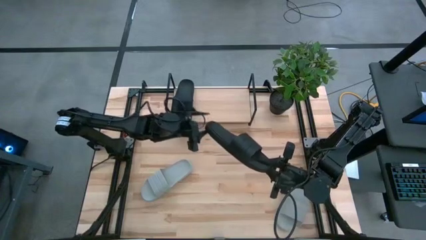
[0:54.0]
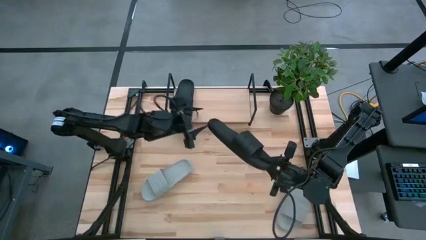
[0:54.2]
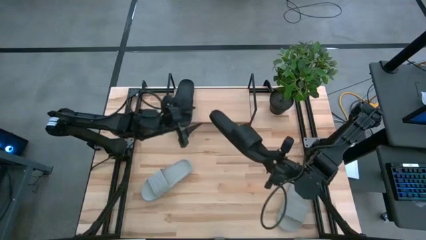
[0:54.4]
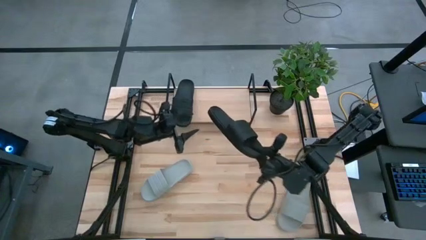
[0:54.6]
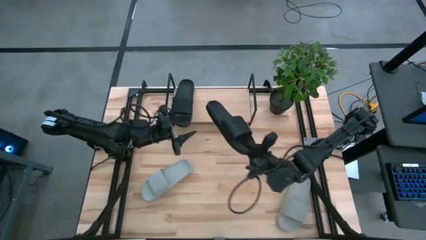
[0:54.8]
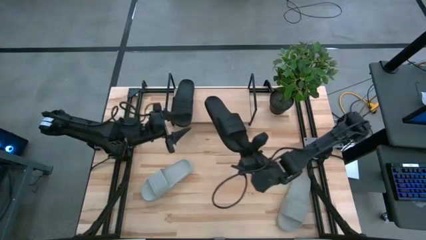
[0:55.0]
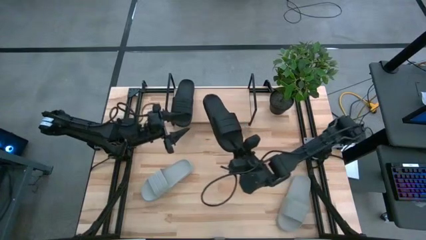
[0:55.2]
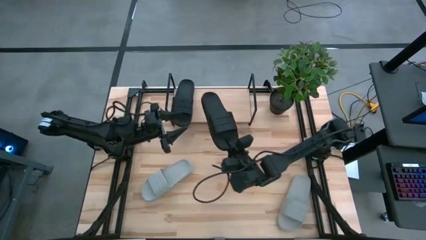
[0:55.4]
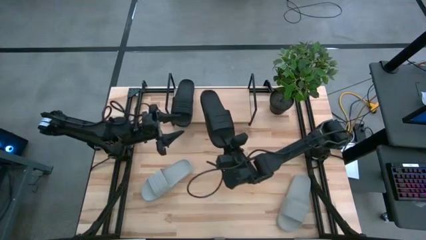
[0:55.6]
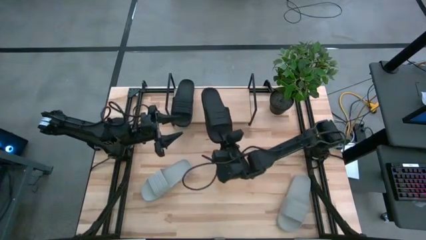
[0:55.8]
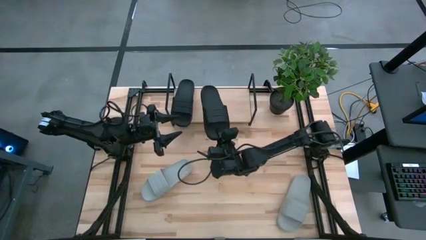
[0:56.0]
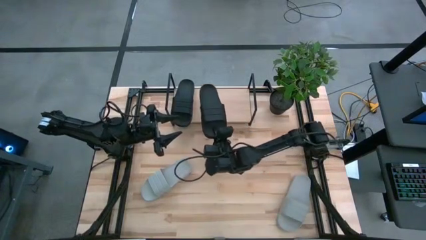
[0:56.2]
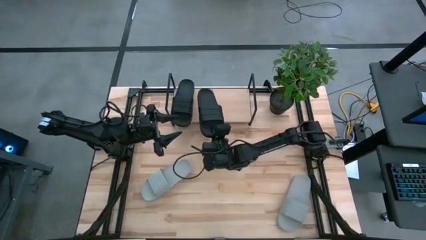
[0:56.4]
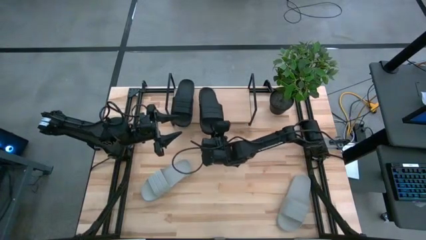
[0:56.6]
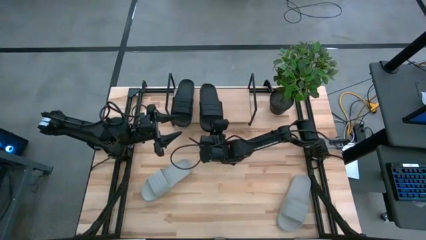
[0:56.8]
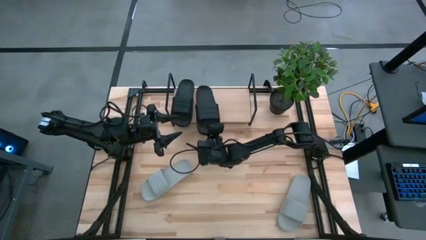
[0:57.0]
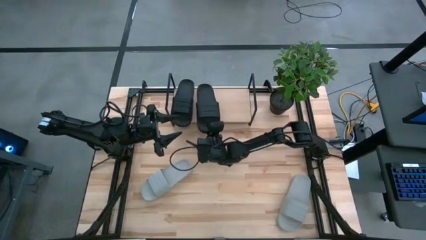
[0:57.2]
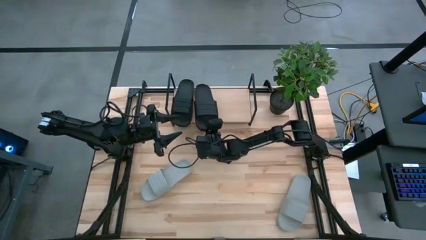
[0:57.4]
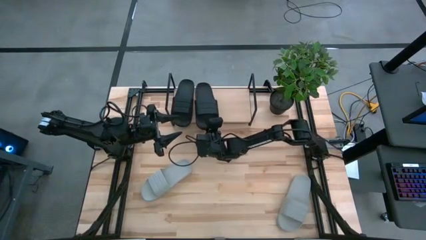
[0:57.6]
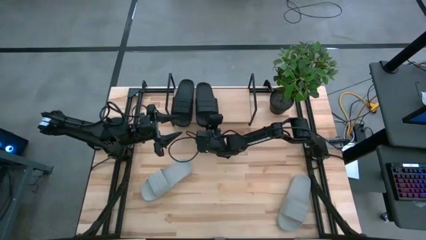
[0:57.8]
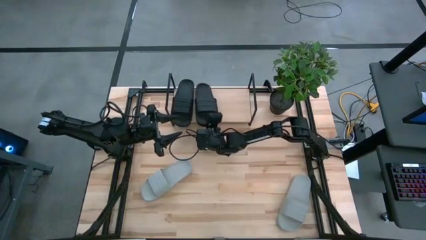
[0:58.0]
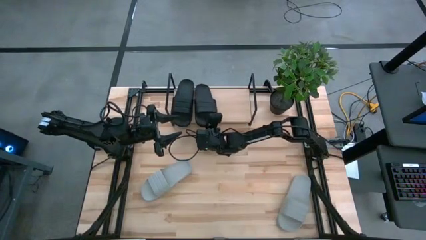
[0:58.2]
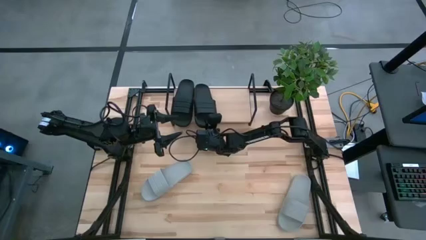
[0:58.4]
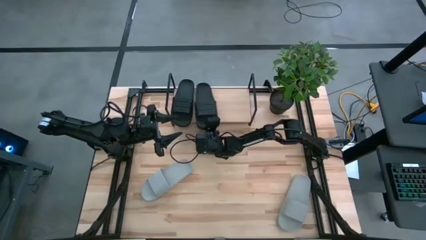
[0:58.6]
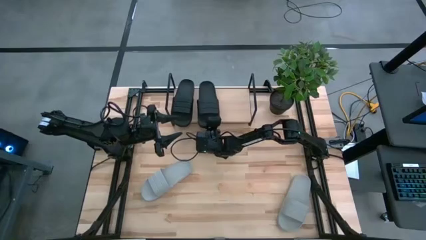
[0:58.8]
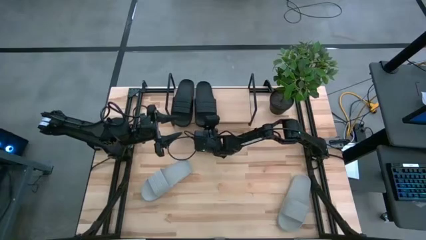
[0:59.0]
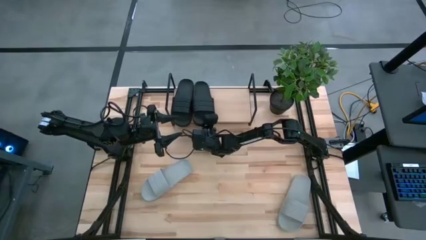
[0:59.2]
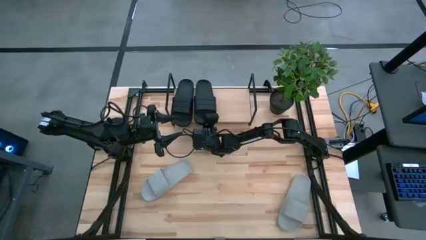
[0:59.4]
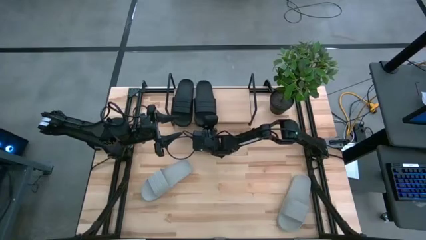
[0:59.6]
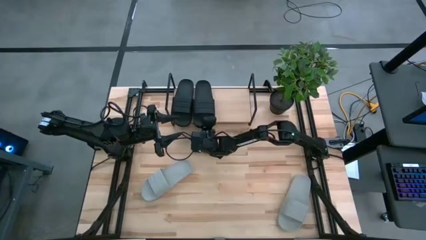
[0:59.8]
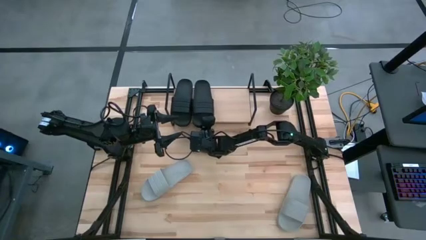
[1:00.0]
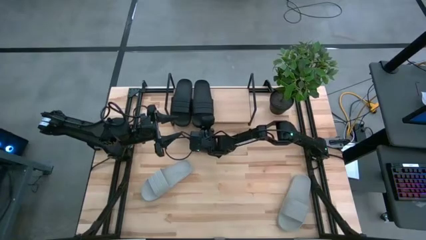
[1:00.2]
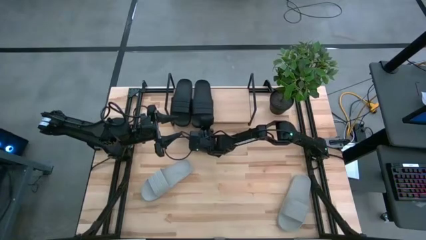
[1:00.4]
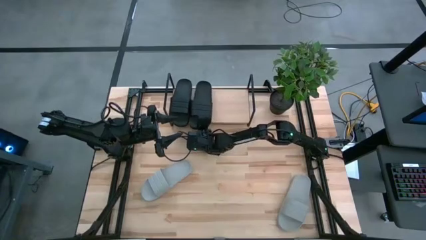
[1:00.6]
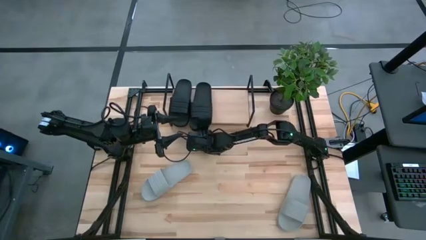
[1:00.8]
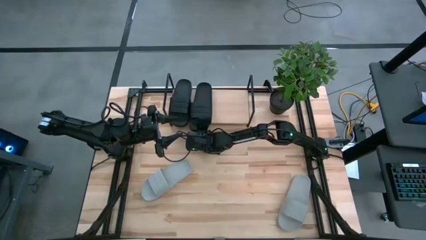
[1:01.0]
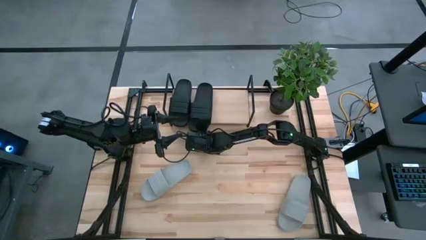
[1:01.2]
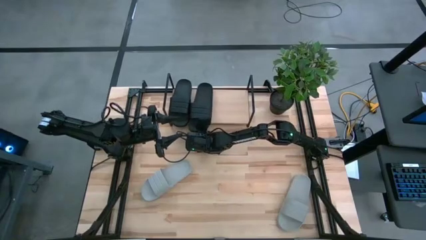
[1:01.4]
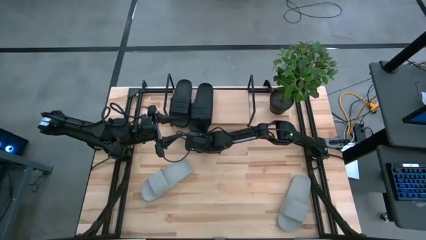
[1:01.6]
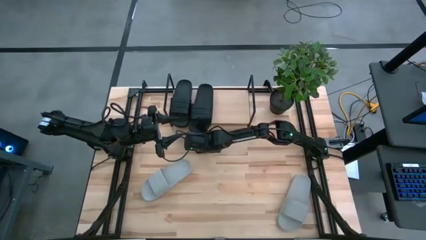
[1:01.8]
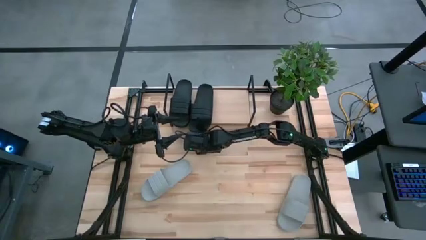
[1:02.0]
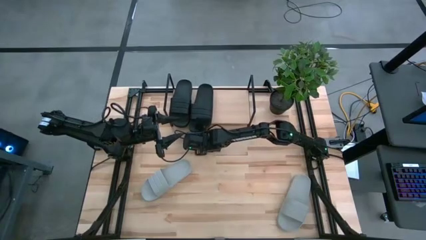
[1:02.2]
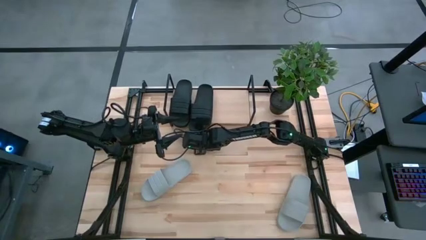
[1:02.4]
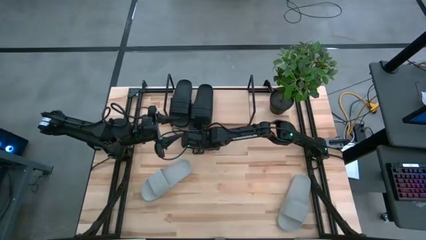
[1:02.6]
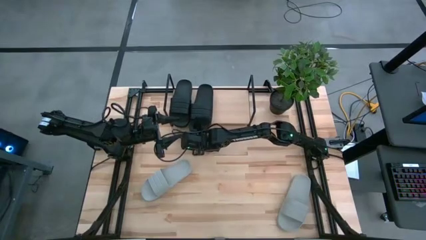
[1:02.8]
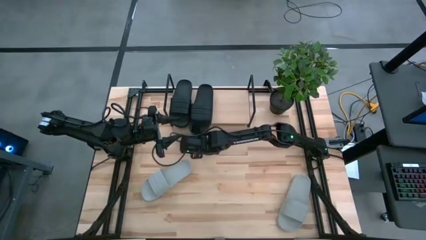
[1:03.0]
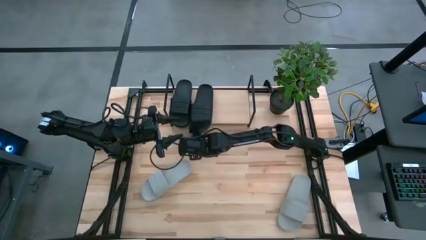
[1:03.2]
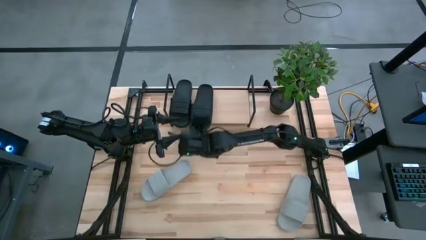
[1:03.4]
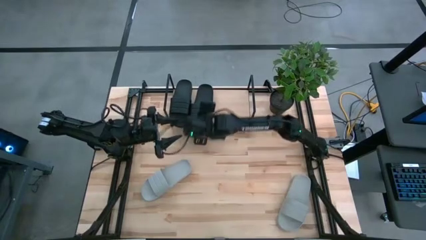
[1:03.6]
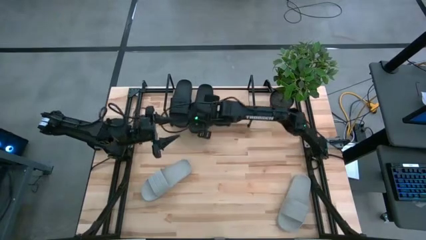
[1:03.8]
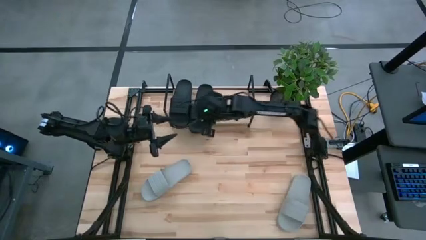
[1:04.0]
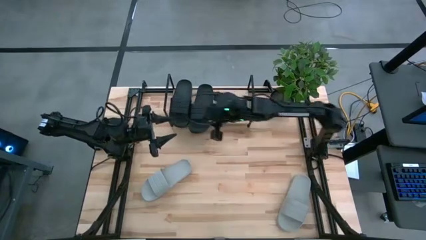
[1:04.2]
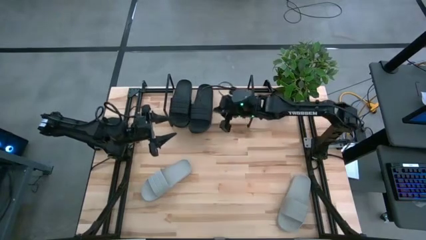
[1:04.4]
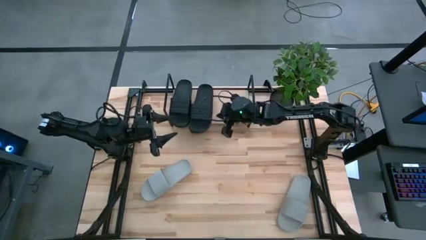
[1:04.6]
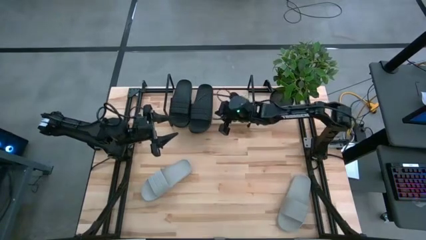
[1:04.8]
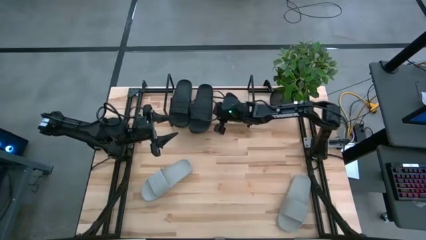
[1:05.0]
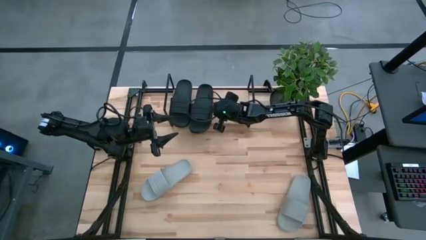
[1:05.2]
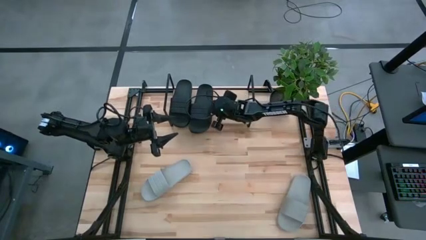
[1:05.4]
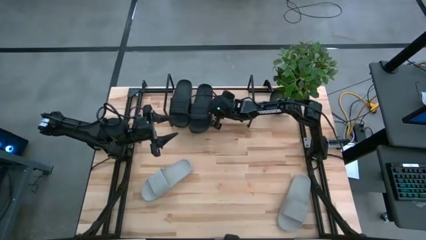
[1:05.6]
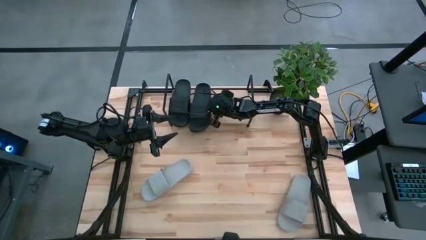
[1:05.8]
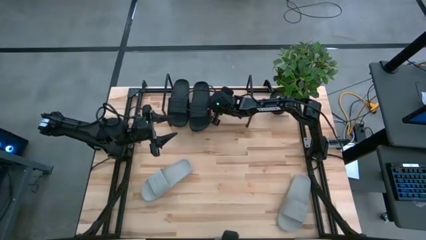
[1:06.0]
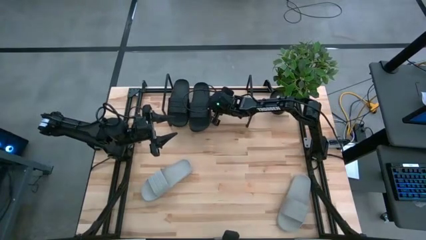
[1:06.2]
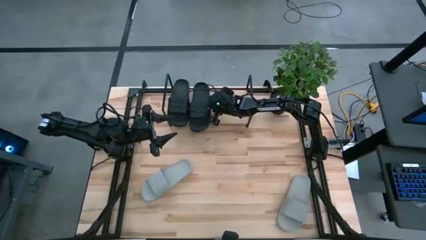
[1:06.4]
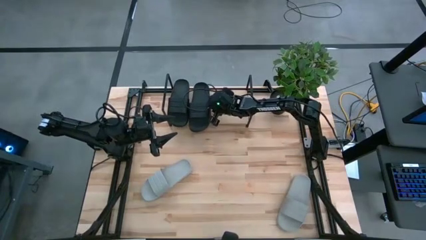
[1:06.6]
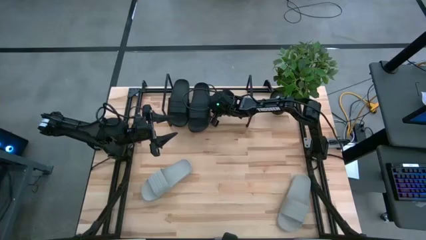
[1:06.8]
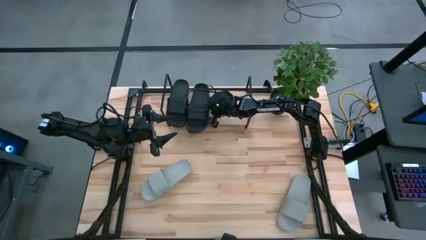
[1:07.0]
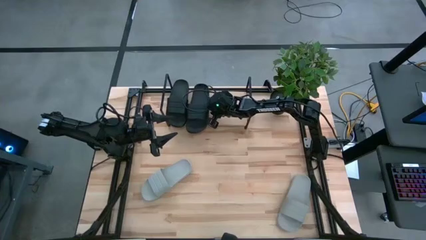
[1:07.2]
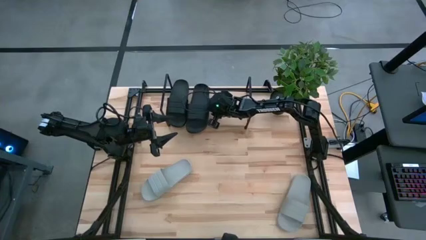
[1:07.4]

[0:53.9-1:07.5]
Task: Pick and place slides into the shelf
Put the black slipper on the shelf

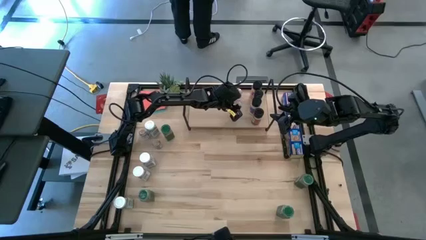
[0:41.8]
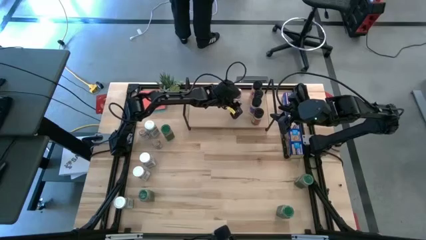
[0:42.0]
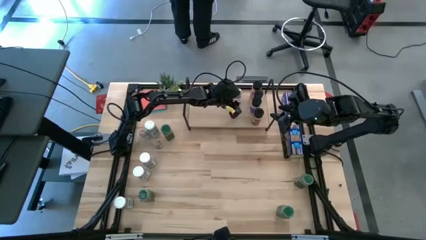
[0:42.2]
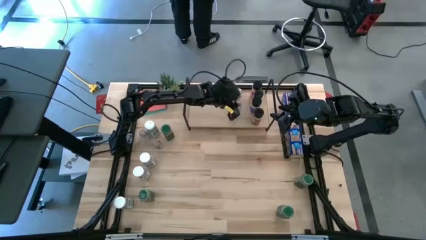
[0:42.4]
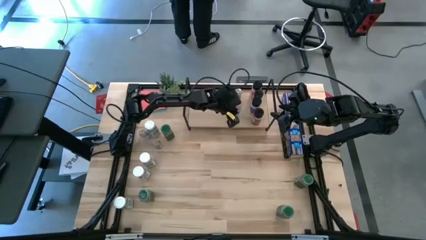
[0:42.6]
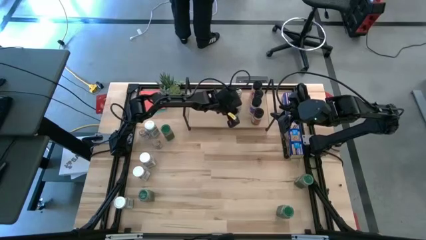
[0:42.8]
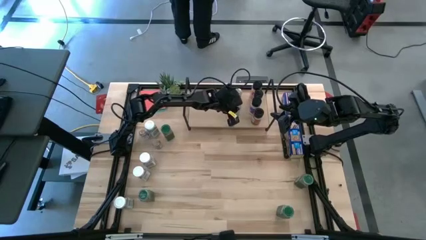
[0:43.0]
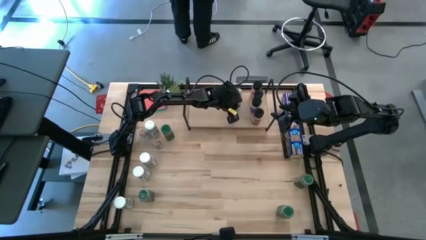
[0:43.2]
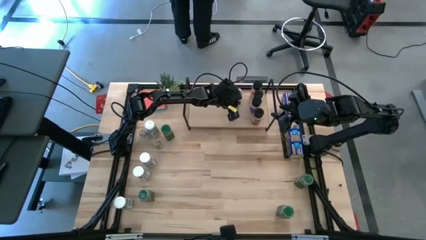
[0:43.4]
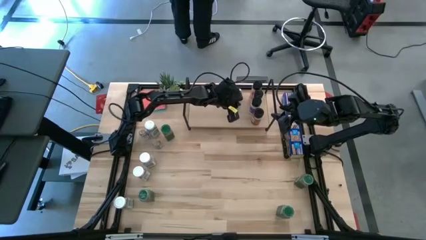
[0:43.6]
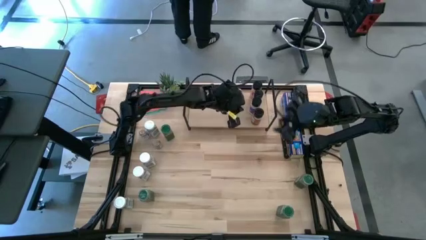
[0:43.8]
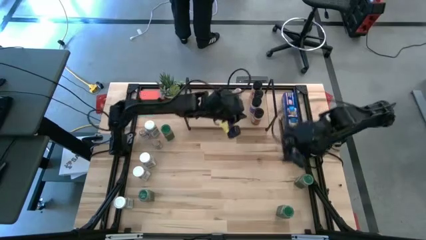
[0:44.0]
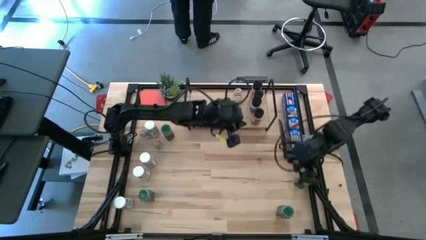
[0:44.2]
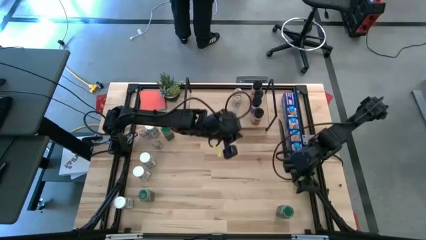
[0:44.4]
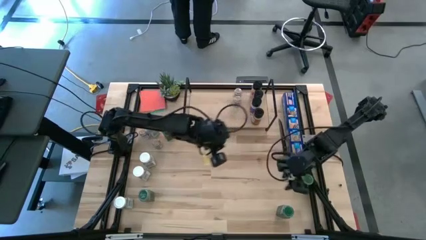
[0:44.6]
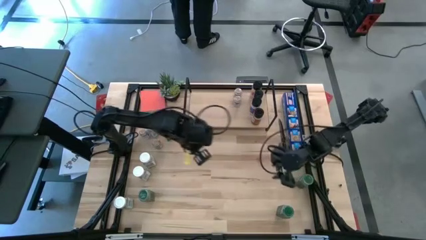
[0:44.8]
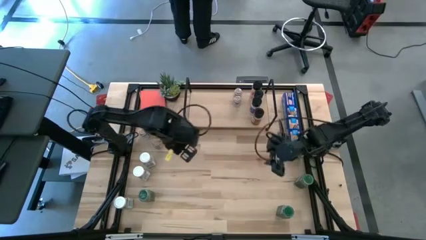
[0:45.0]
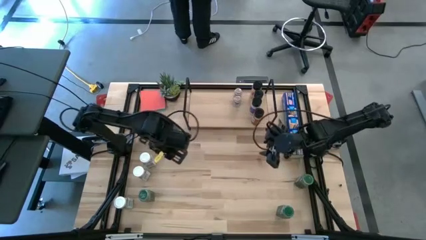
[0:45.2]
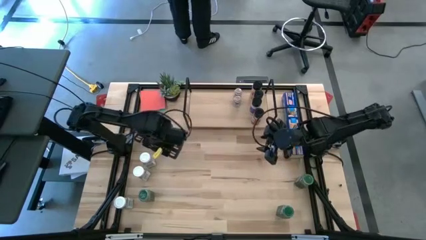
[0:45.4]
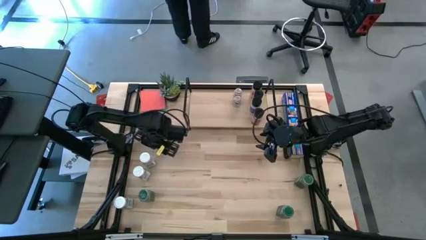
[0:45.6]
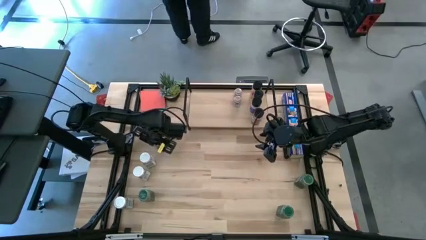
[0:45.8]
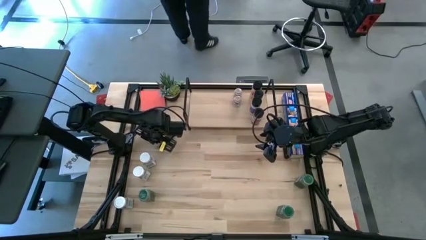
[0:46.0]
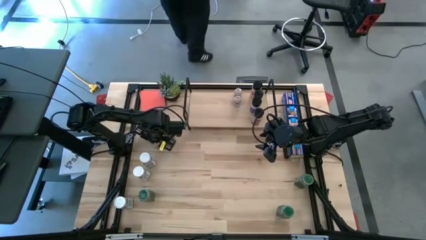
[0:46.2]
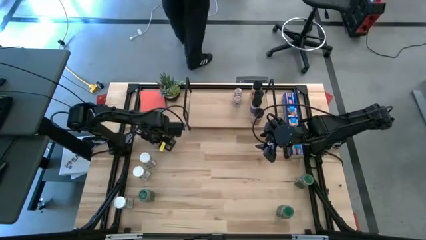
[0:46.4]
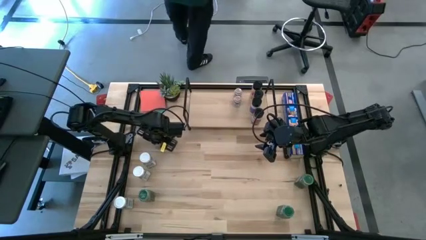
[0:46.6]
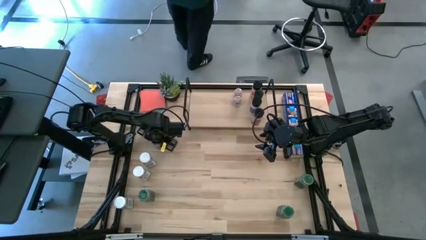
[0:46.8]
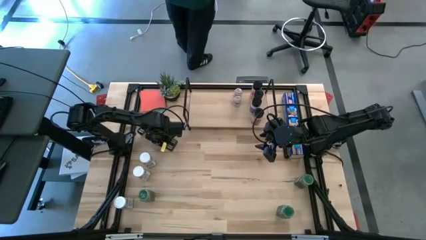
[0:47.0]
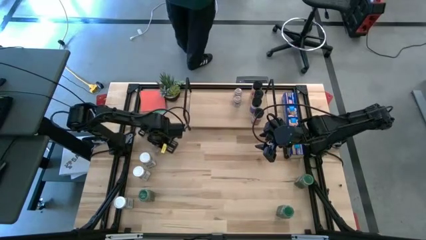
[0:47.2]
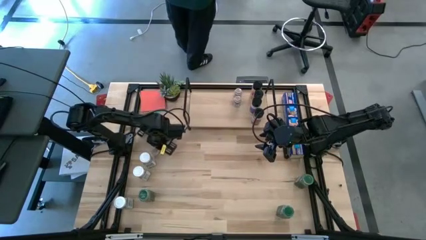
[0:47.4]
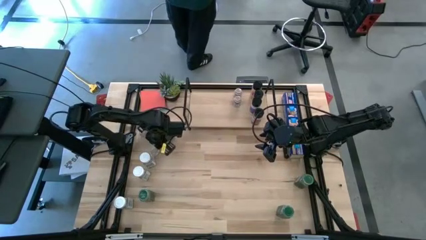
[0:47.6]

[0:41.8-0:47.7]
Task: Shelf spices
Put the brown seasoning bottle on the shelf, aligned with the other brown seasoning bottle
